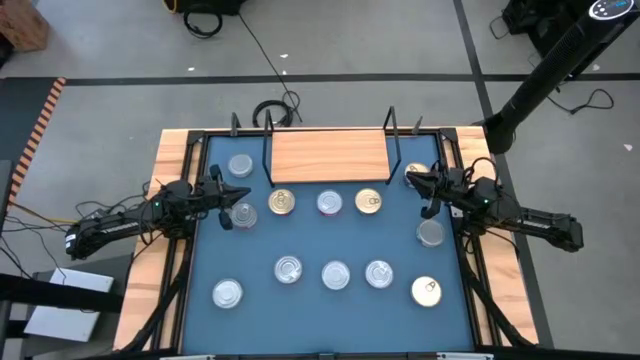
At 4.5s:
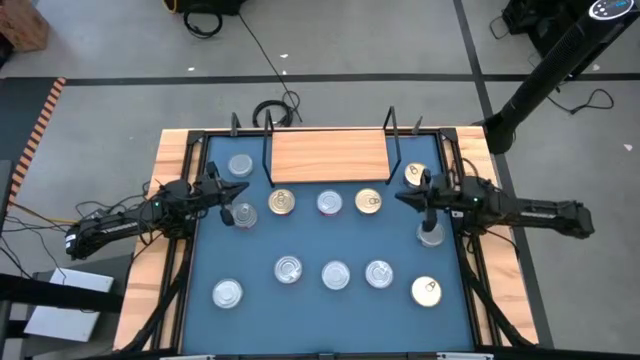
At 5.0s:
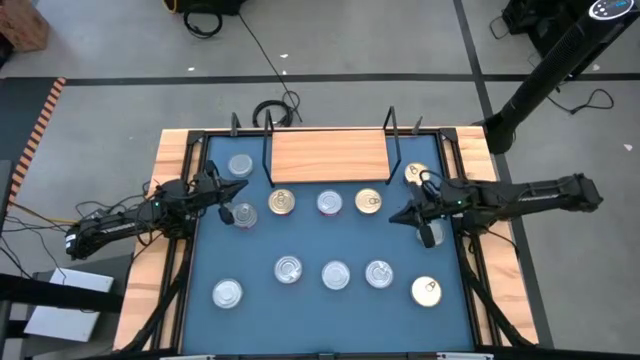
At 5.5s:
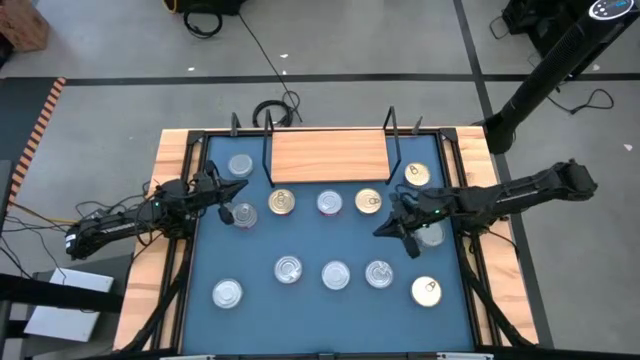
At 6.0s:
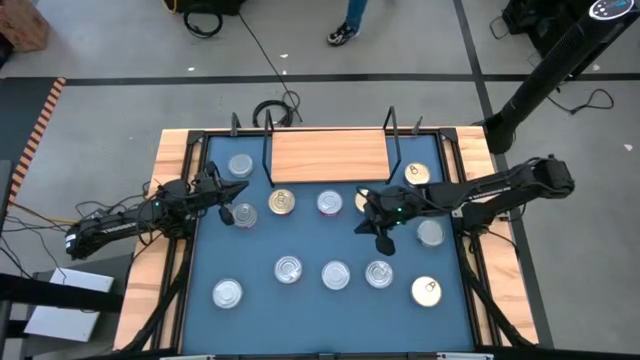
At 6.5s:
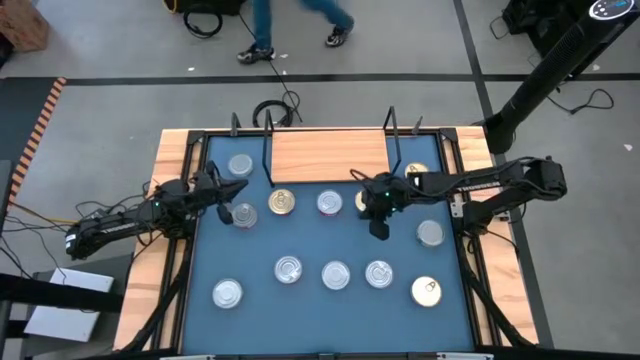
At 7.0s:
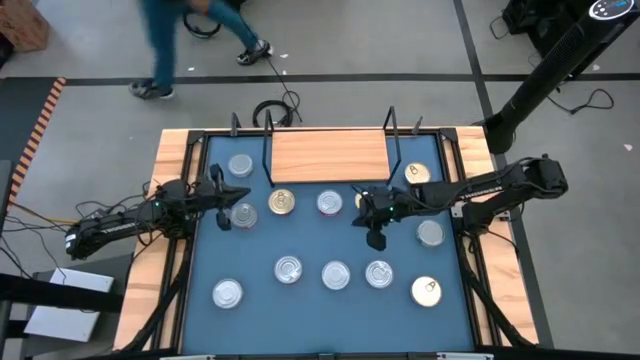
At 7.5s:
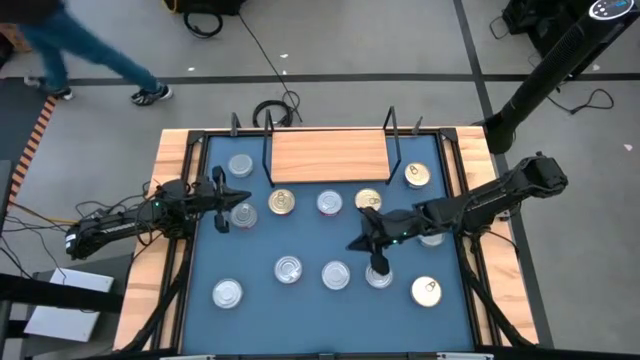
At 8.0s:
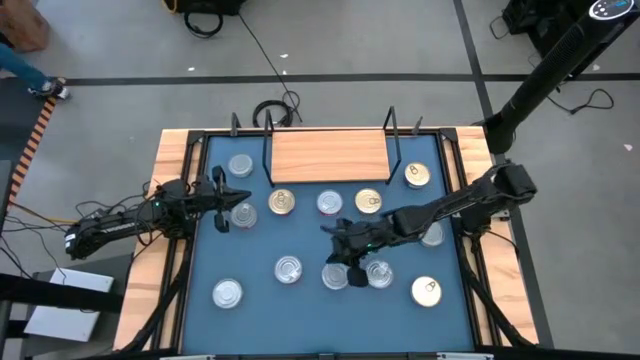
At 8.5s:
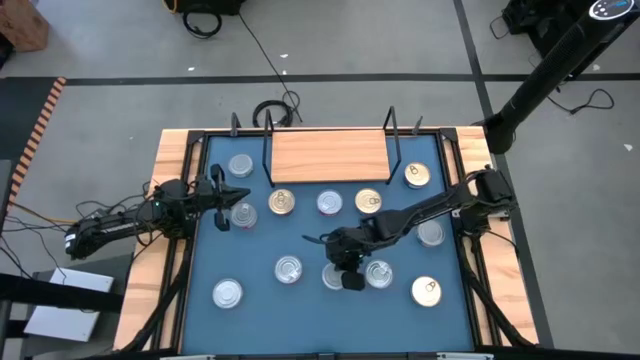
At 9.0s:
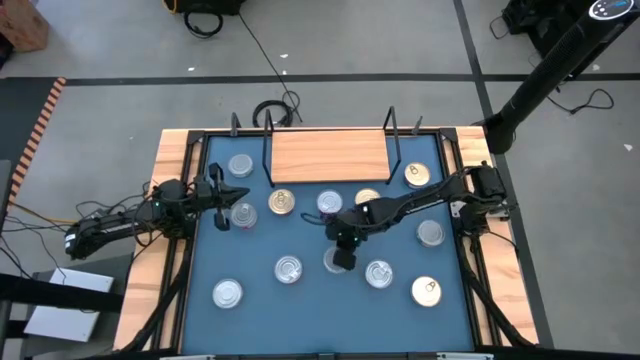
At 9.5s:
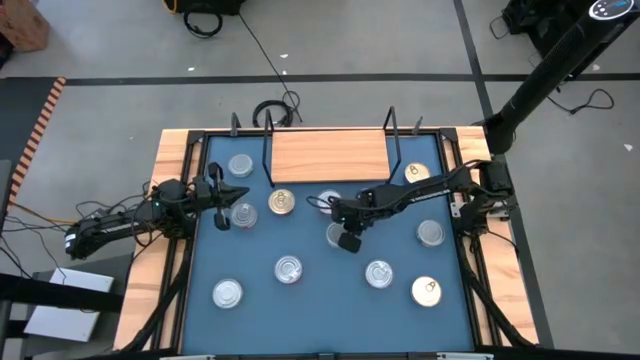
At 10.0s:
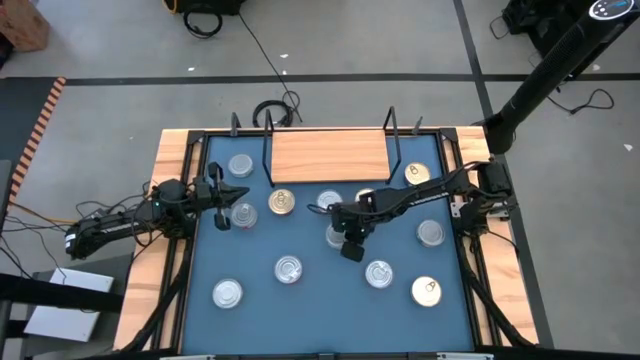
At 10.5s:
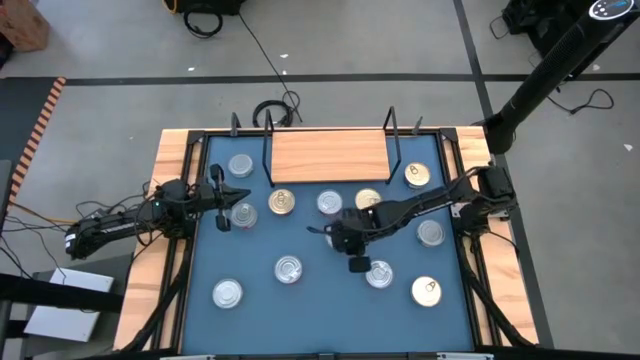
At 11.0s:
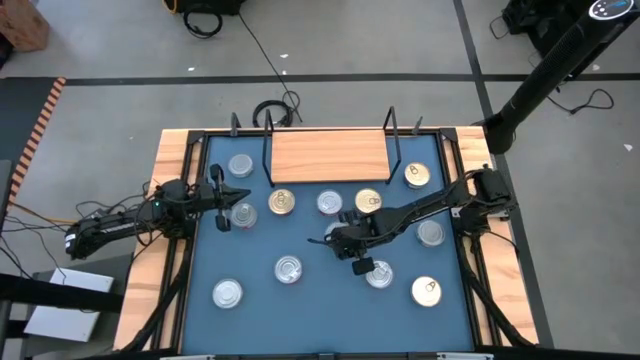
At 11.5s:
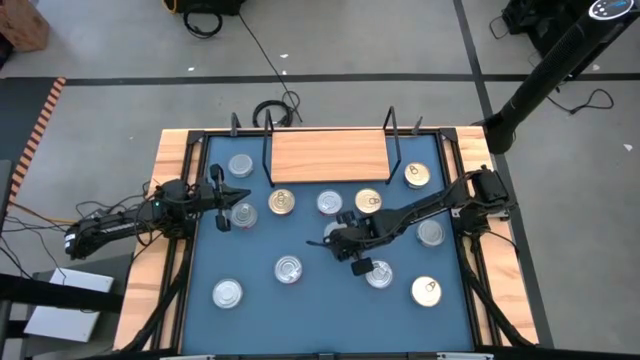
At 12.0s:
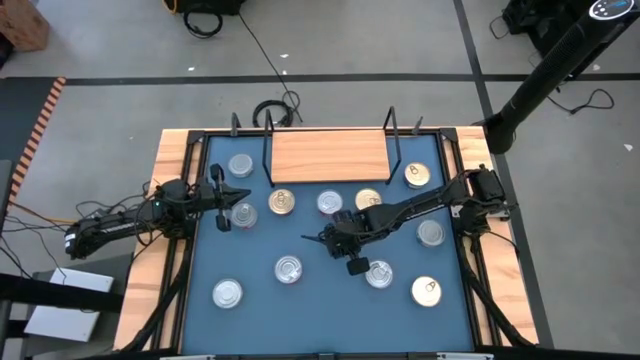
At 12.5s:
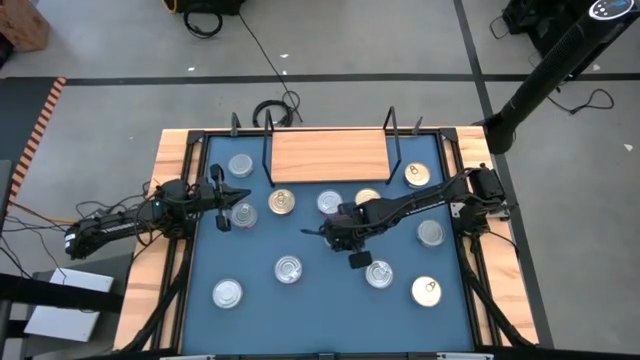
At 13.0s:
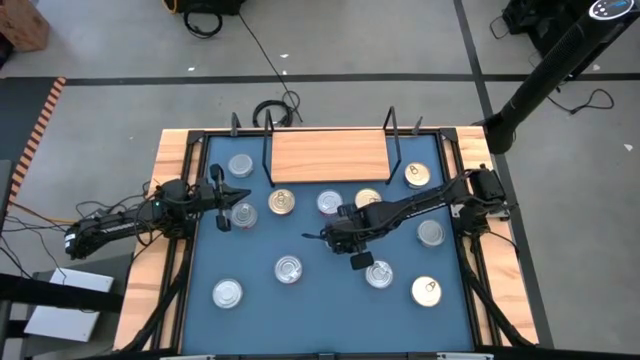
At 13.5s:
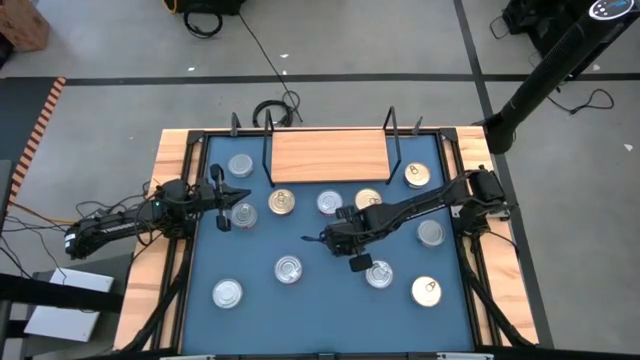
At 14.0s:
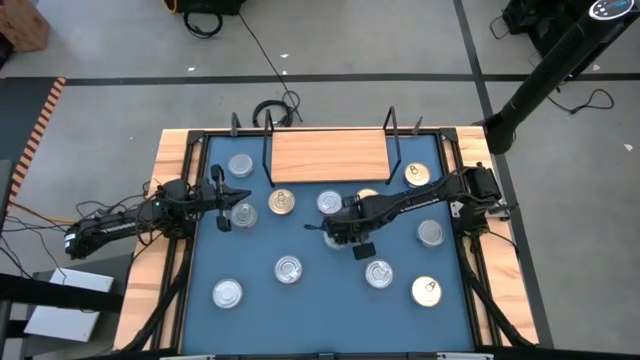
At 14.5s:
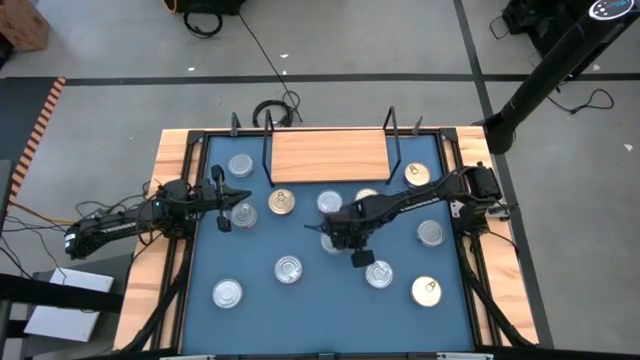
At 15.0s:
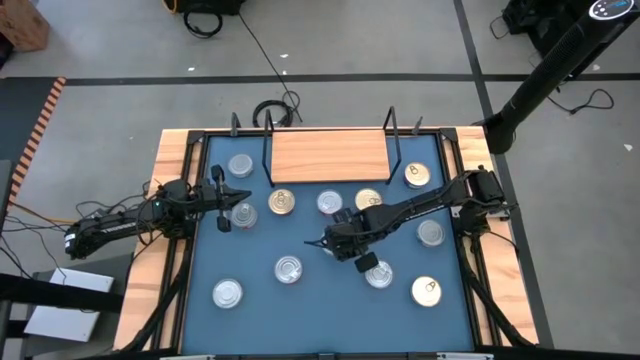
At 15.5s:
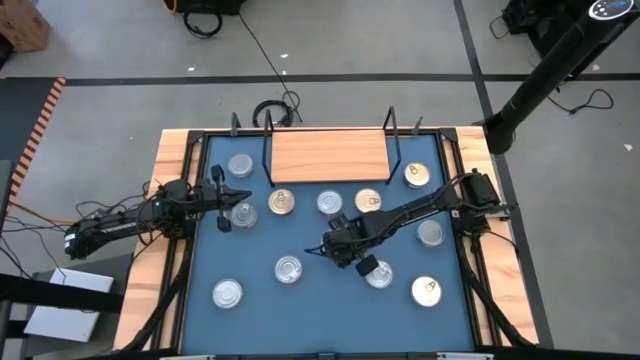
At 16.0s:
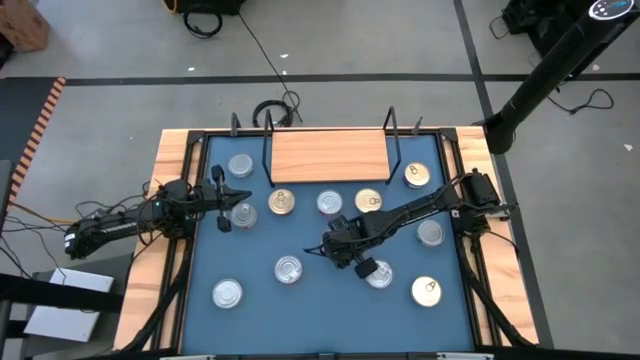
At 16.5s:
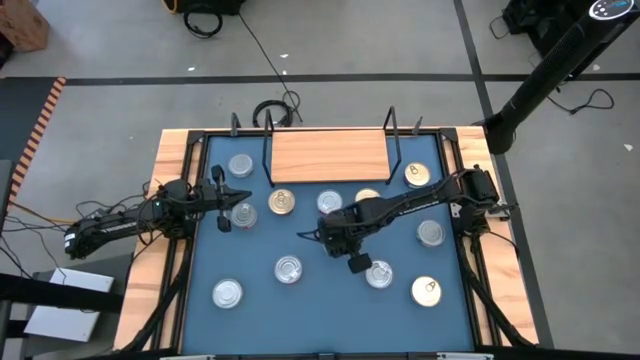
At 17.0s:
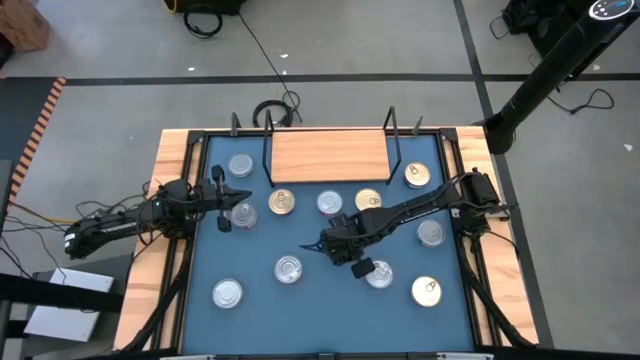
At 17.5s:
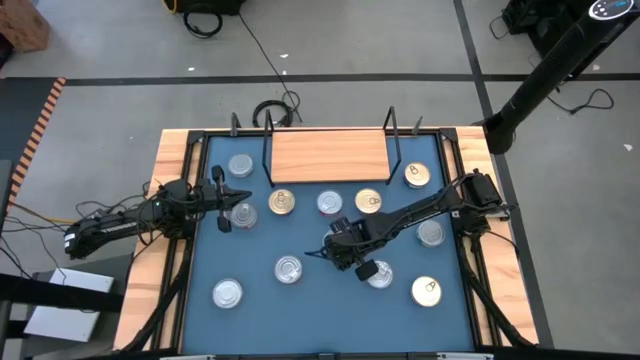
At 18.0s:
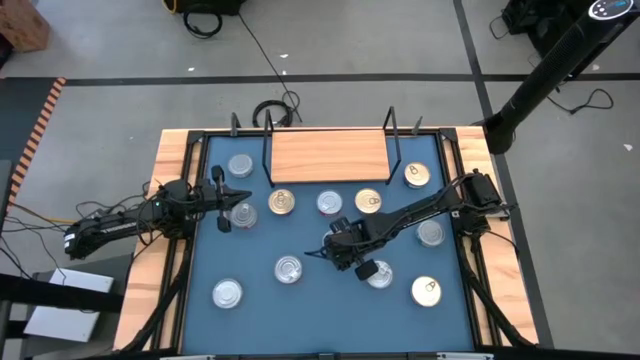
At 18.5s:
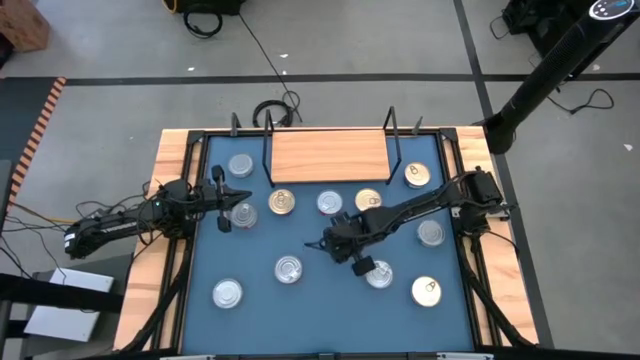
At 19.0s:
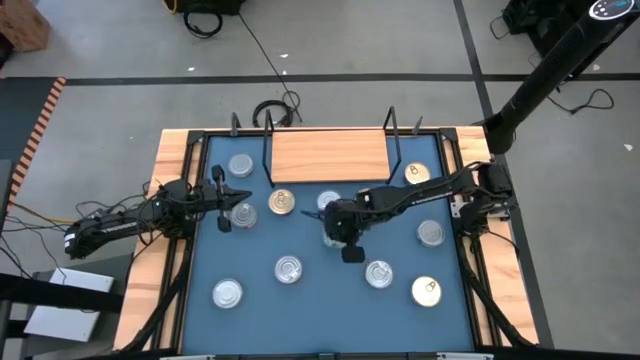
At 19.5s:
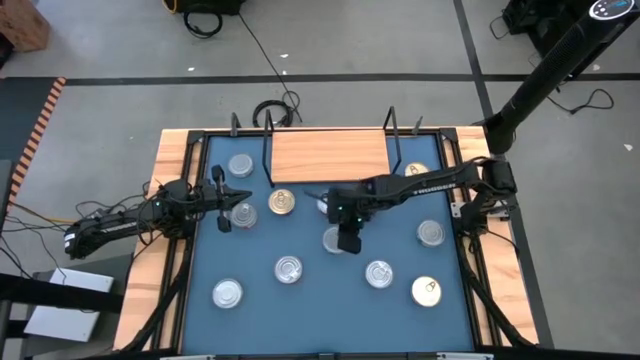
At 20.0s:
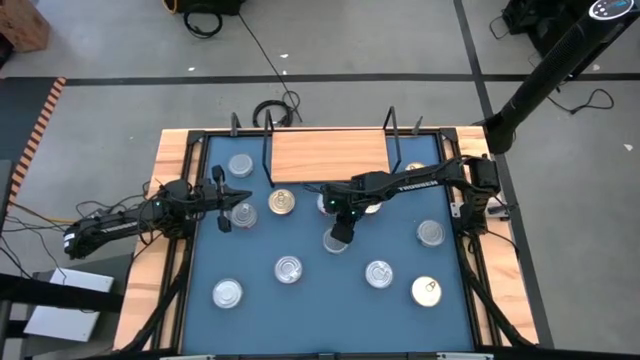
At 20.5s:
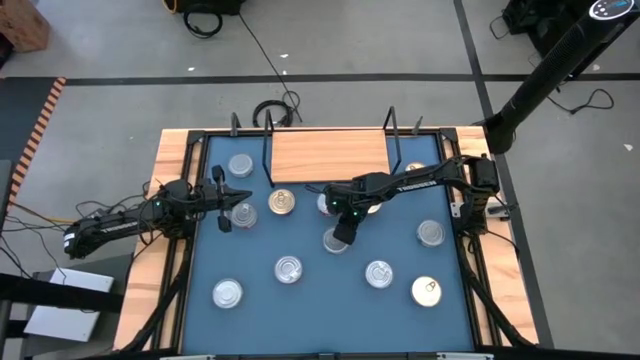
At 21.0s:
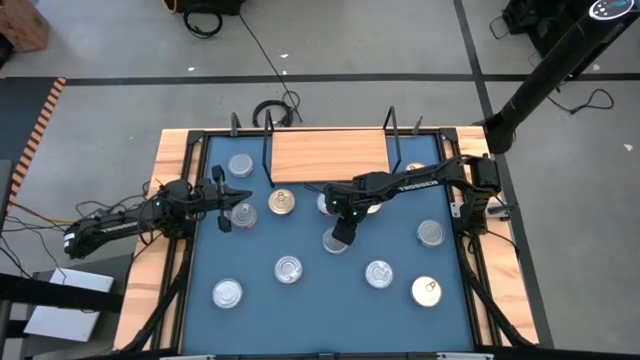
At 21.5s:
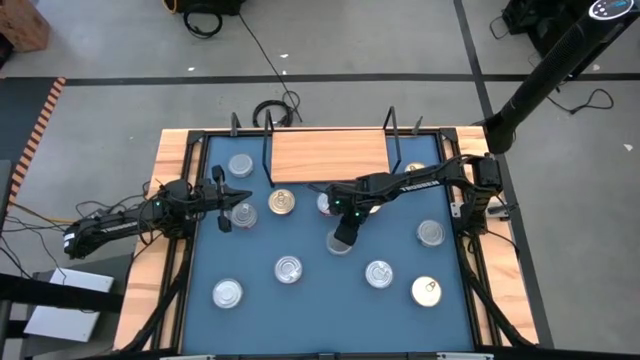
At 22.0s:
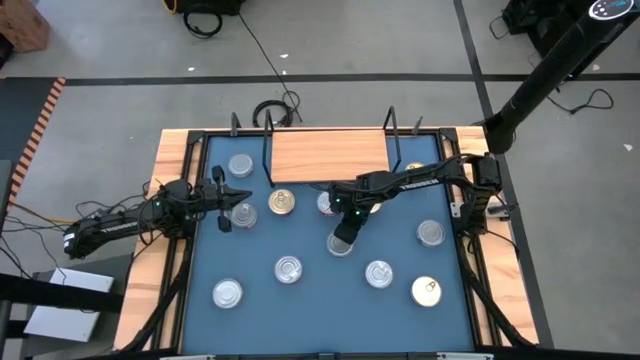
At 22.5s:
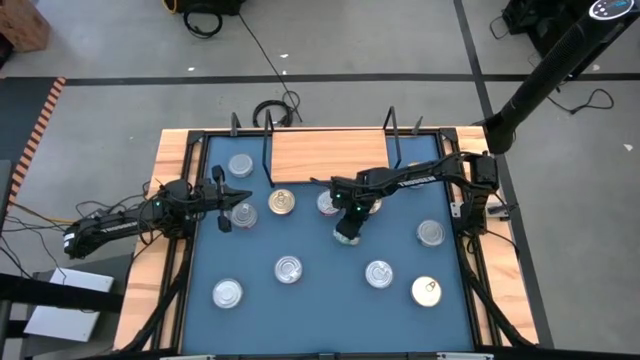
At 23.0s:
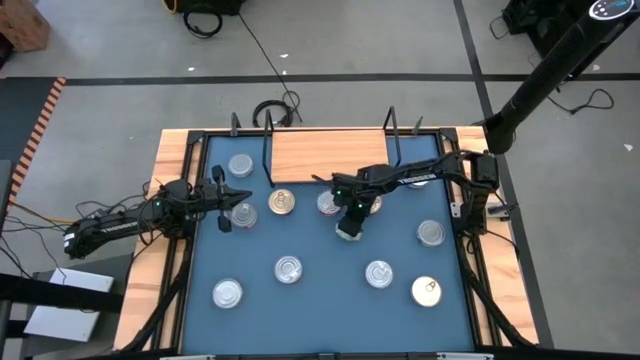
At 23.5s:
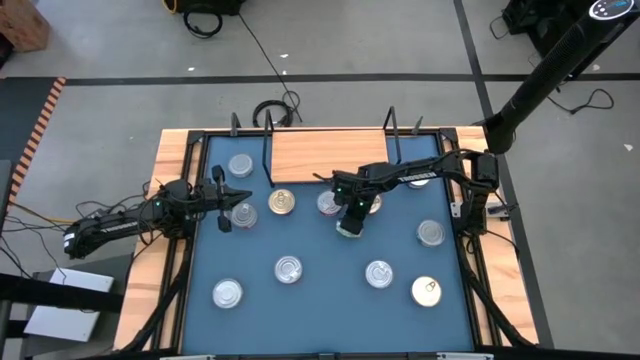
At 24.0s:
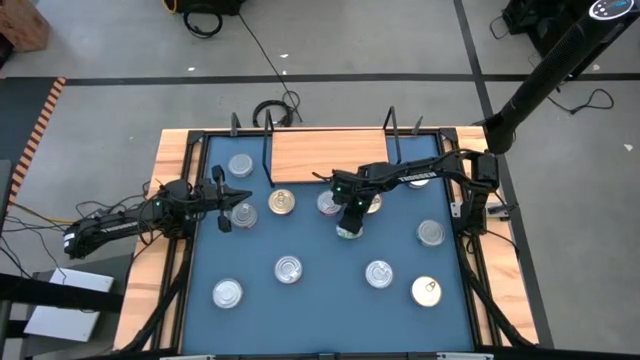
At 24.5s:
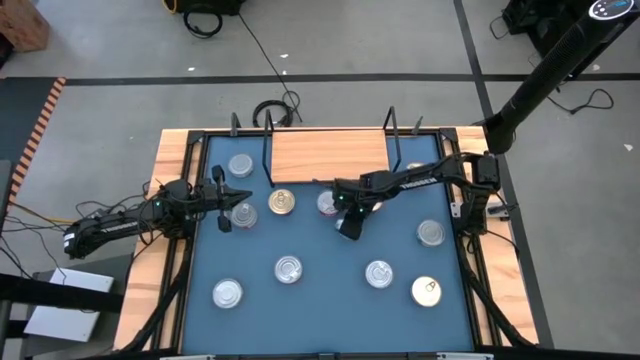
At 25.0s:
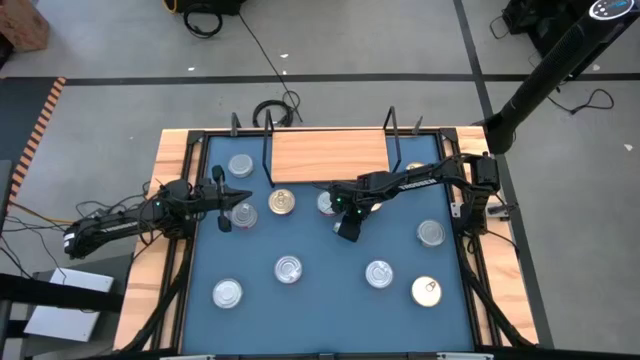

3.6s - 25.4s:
Task: Stack canned seafood by type on shelf
Put the green tuna can on the shelf
